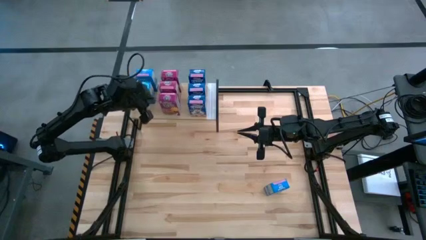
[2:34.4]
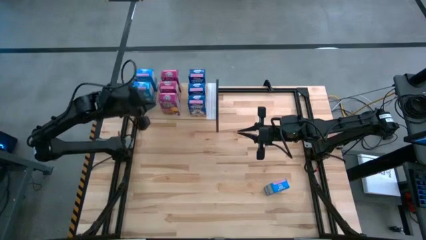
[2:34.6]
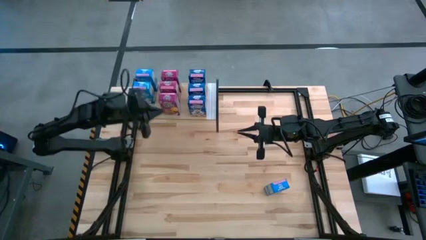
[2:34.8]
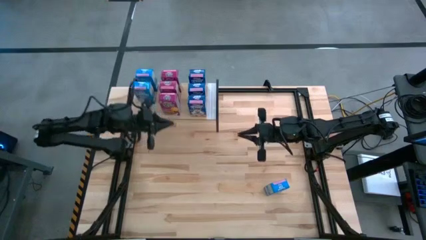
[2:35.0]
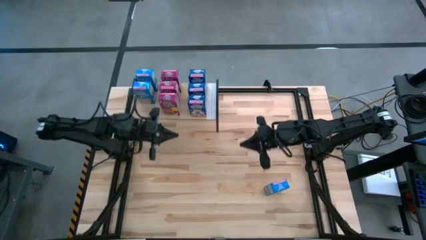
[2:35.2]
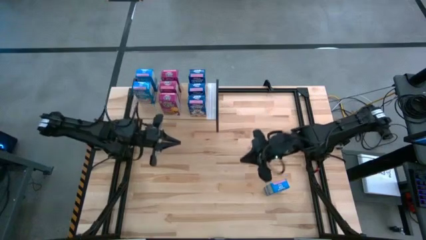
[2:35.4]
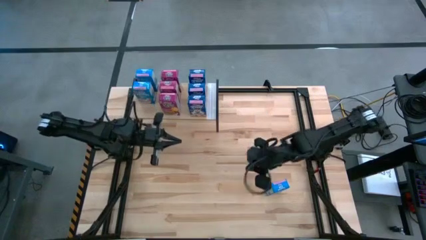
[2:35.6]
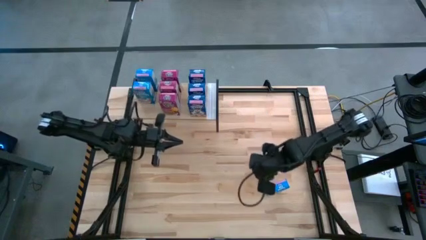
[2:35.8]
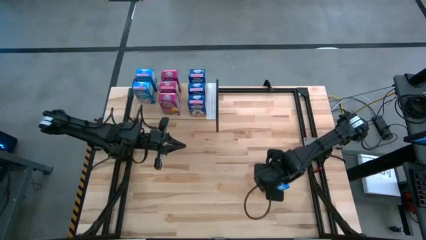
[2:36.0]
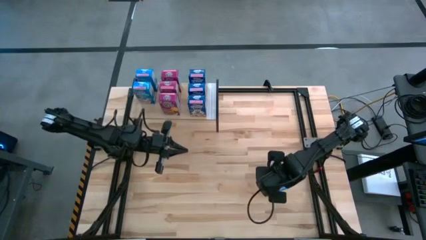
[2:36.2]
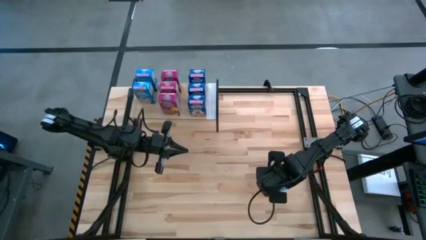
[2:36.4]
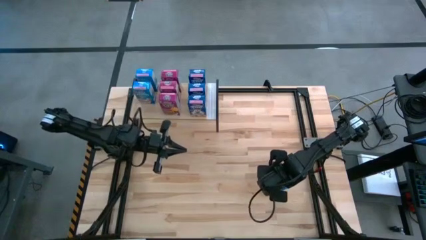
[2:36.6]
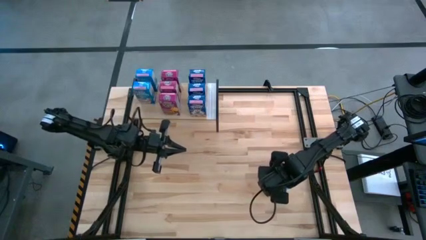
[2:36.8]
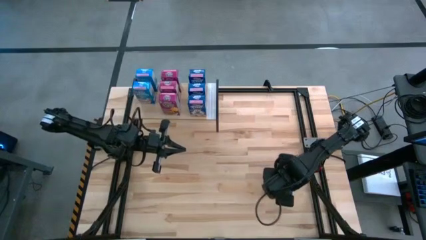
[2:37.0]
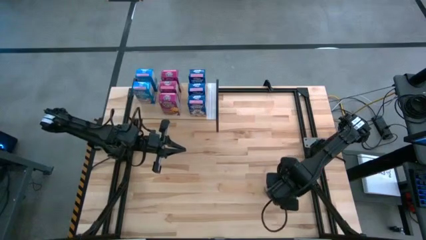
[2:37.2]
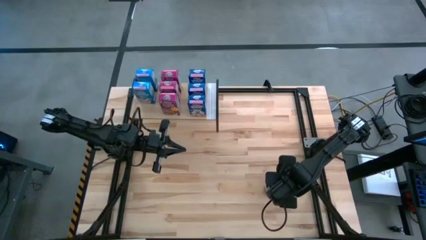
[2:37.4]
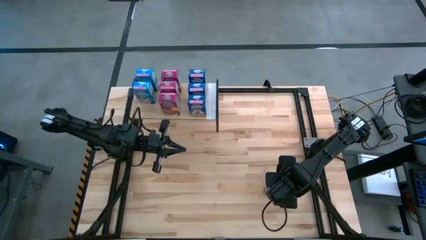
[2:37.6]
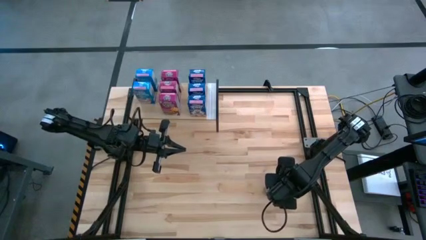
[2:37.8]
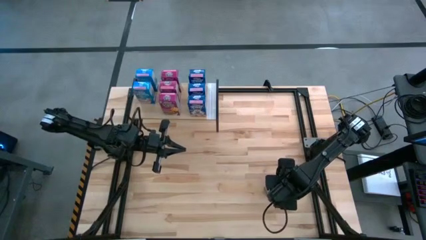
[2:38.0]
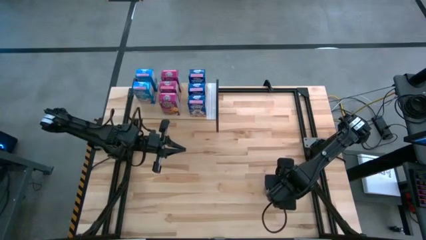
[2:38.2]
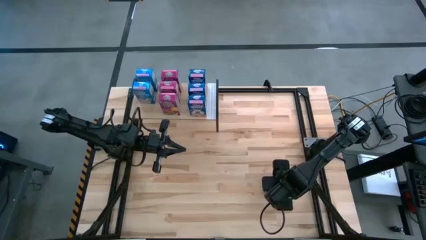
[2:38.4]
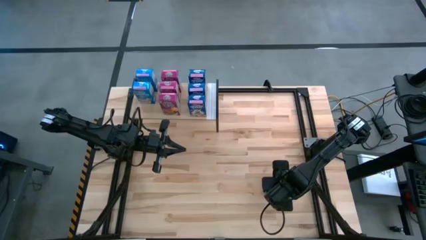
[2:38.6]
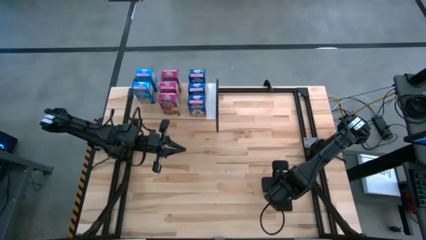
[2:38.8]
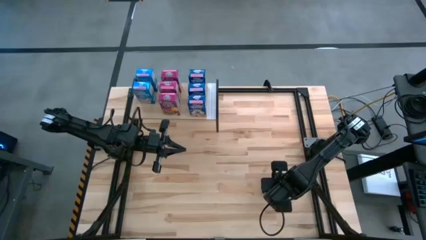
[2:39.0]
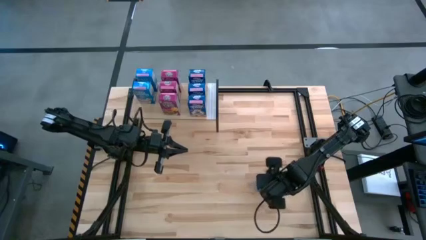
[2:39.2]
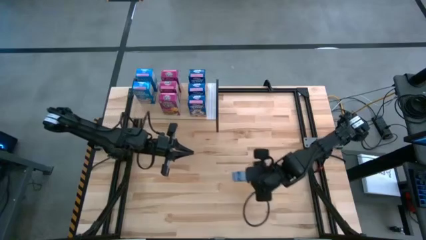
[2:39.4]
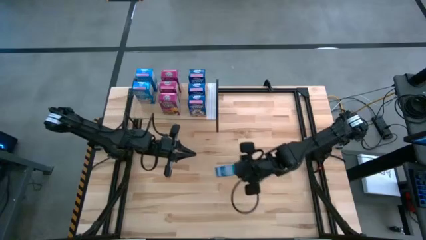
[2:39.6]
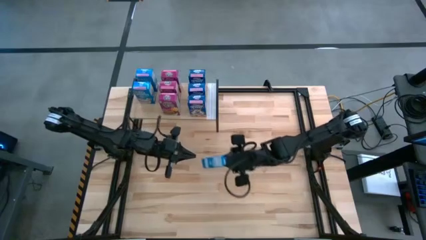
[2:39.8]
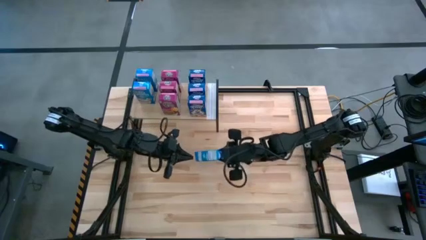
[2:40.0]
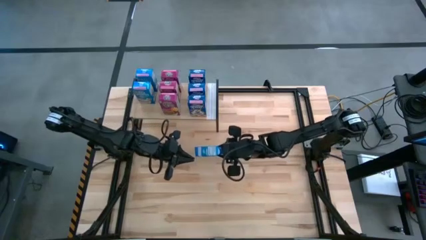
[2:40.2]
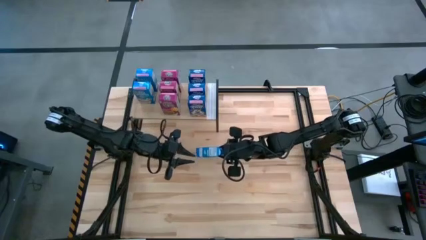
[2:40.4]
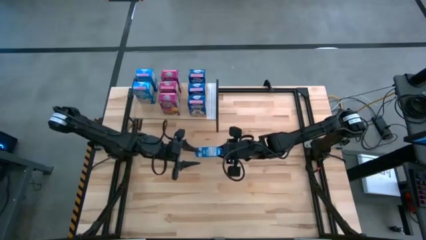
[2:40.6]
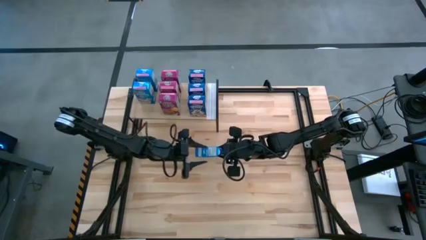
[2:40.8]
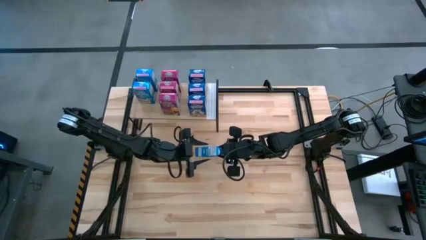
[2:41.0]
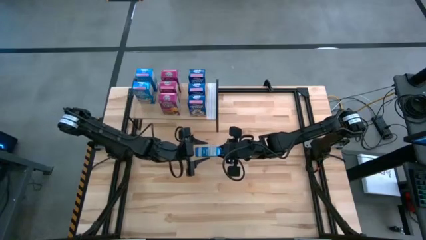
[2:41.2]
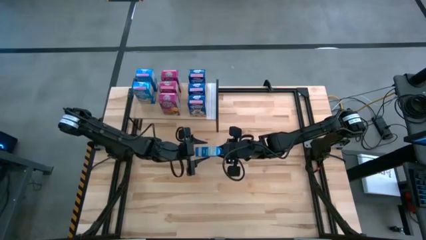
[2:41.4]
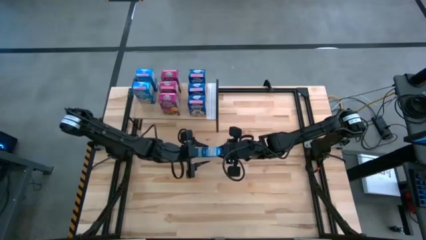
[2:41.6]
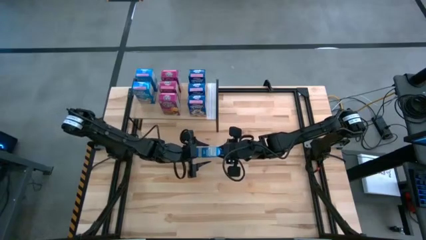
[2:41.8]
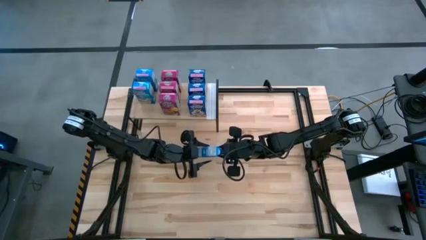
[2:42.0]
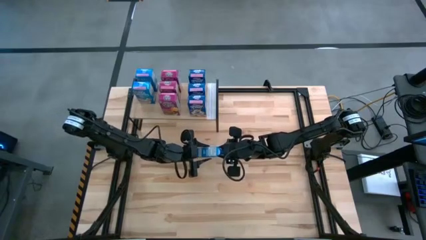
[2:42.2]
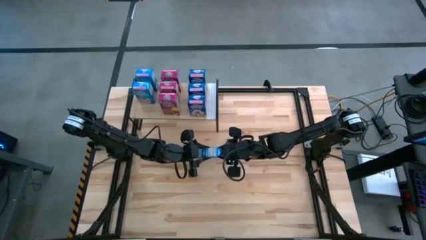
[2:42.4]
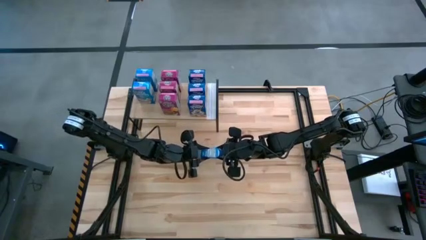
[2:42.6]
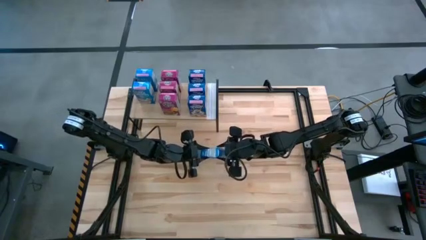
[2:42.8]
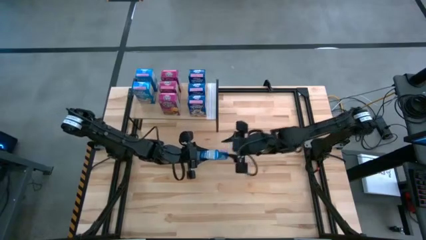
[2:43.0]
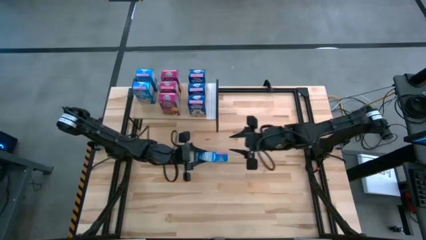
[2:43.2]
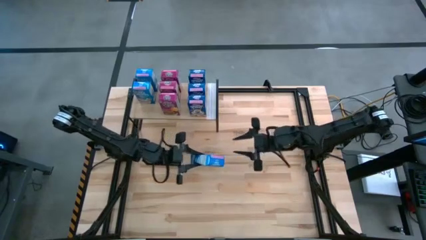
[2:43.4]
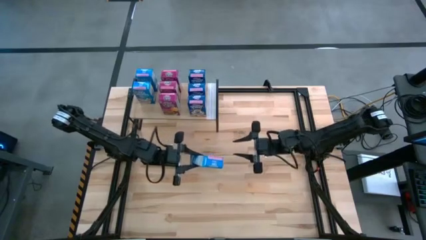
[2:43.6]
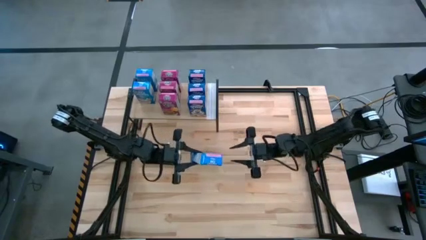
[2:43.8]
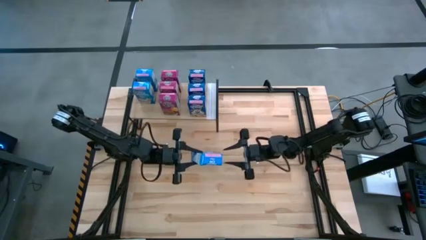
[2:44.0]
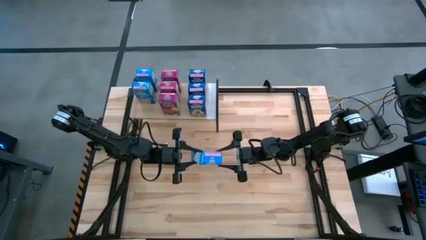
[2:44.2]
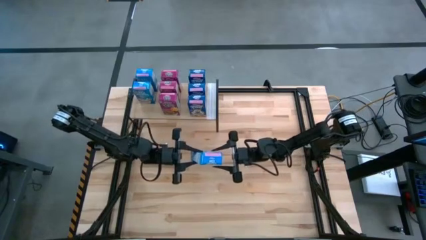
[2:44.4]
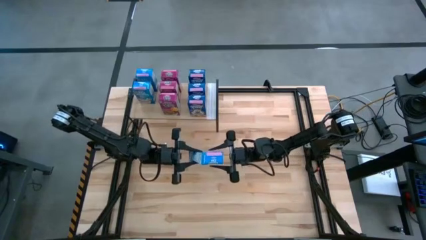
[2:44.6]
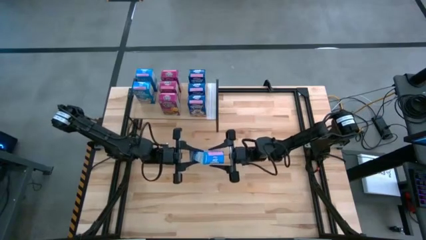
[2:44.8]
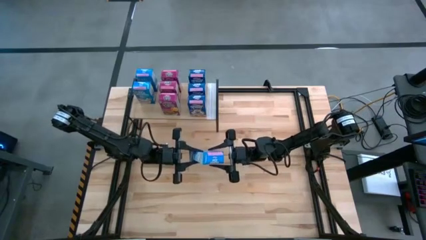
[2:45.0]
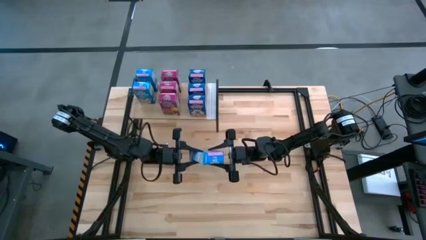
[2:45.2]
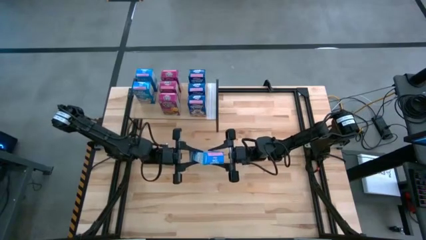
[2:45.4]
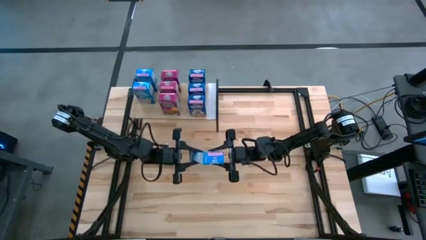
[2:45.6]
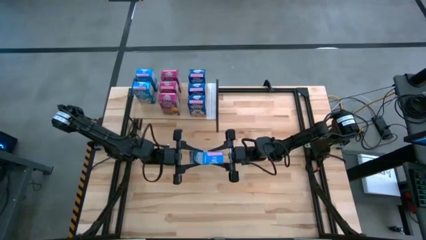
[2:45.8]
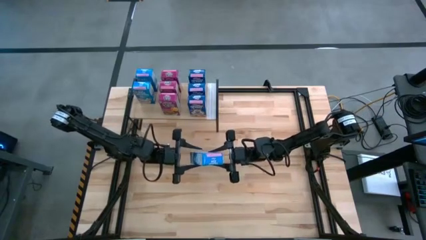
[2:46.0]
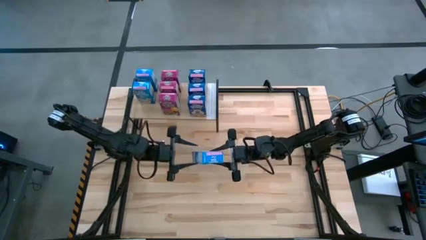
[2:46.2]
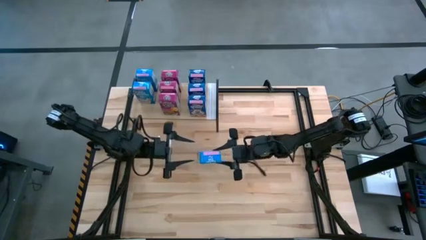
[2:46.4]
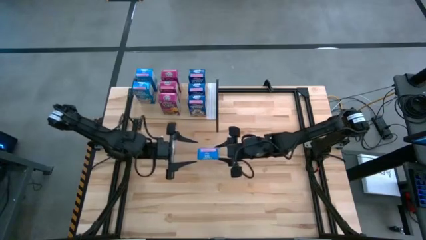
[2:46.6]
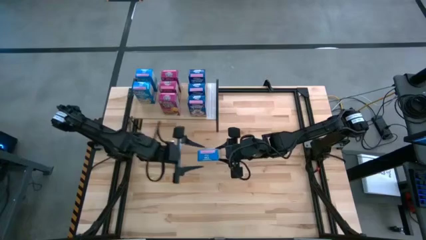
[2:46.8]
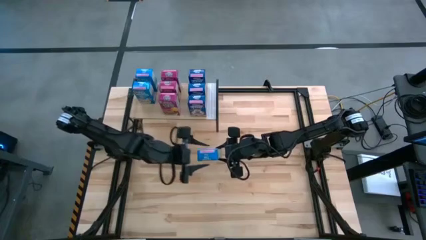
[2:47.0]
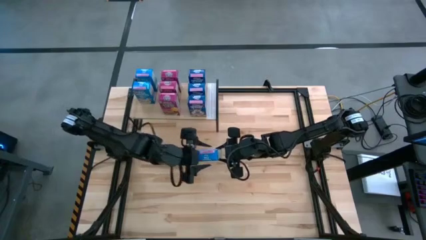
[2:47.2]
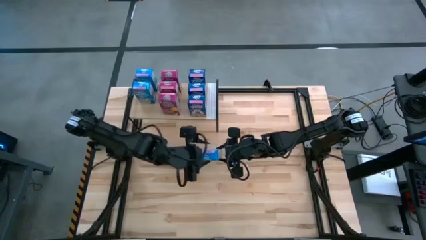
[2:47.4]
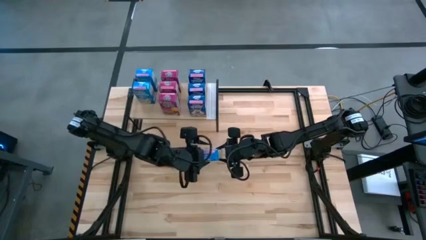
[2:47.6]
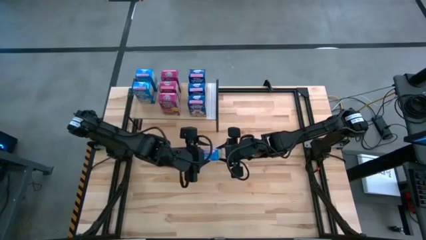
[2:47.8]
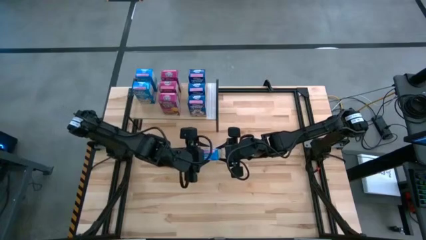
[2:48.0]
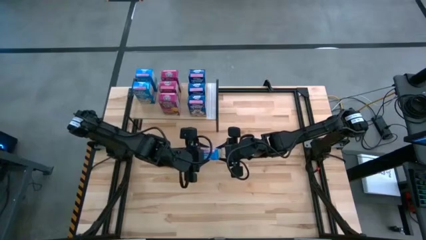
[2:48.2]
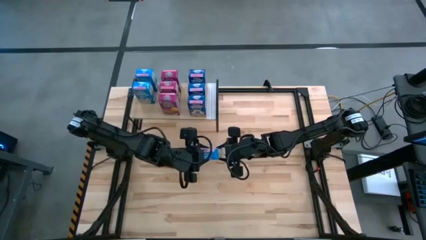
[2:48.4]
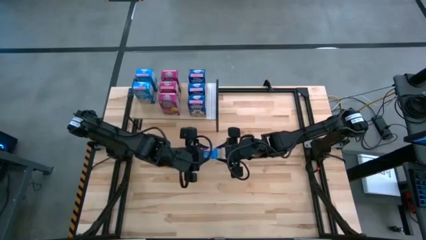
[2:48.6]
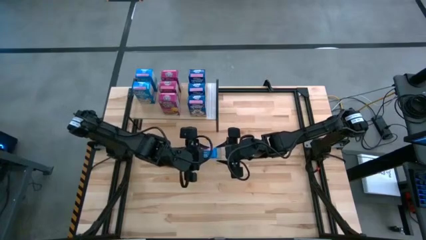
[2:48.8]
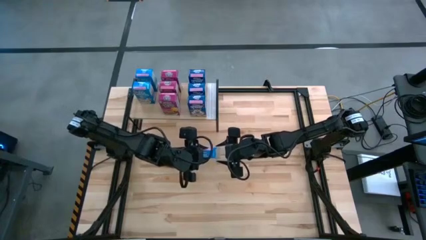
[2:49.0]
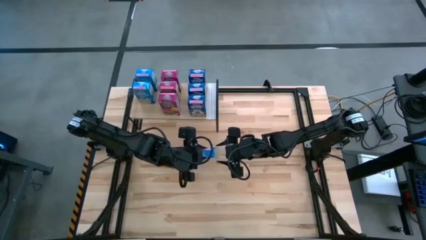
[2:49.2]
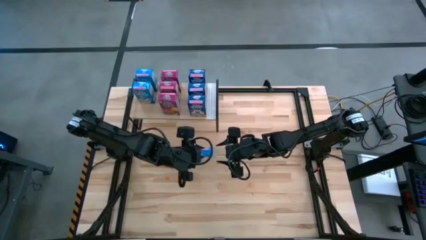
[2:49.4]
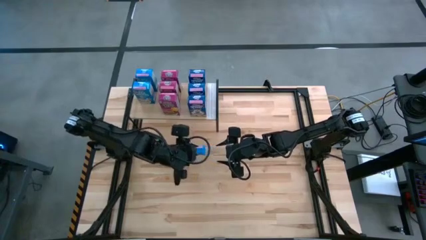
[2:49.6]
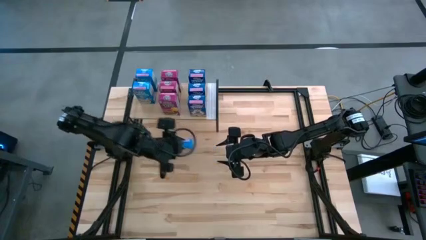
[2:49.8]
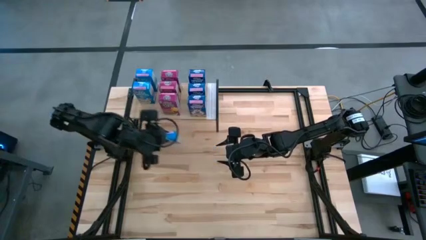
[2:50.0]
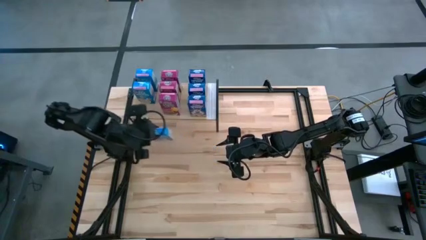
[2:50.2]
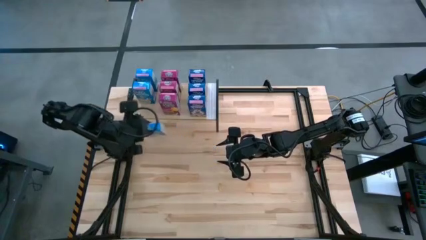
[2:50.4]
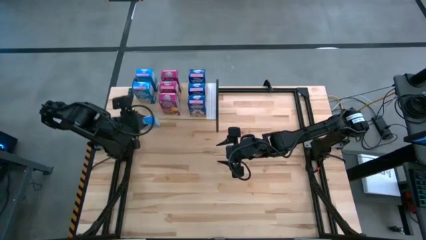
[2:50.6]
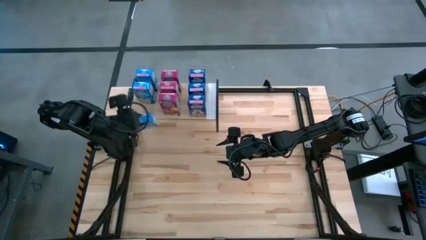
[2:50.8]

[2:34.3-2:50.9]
Task: Stack cereal on shelf
Put the light blue cereal box on the shelf

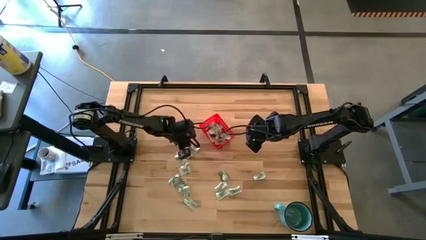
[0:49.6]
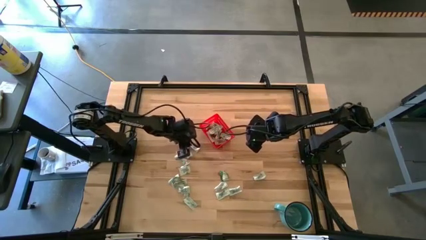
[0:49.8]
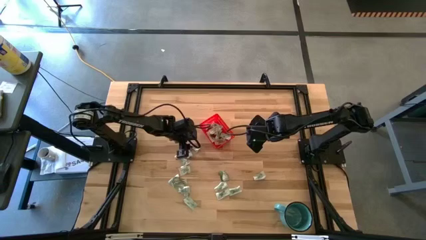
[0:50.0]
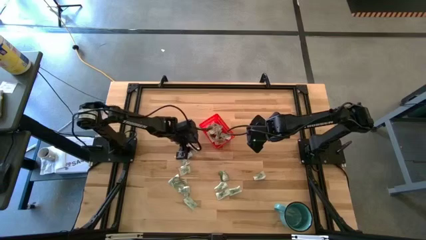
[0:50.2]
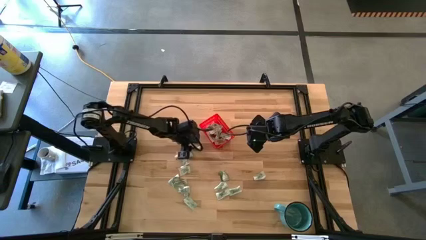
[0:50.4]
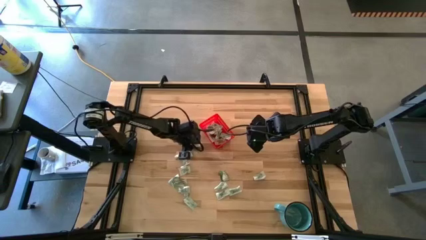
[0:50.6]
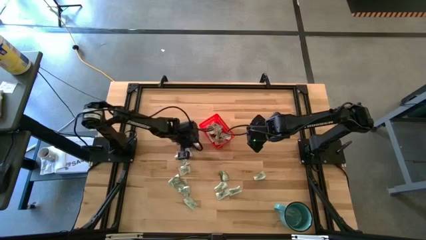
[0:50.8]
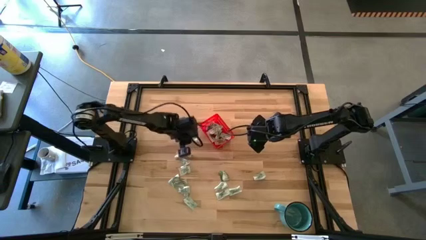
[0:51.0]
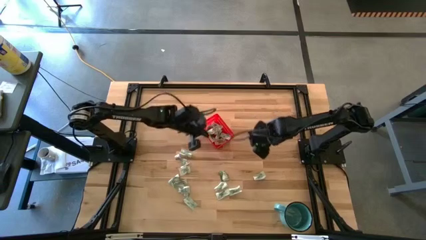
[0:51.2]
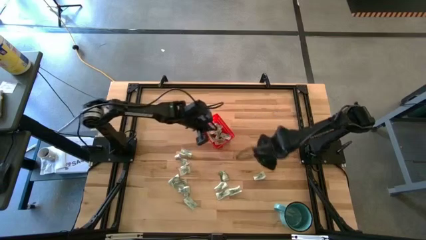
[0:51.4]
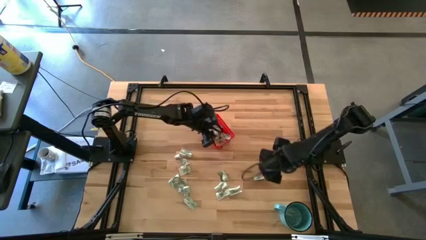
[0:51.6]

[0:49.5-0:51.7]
Task: Pick and place Stevia / Truvia into bins
Put the stevia packet into the red basket
